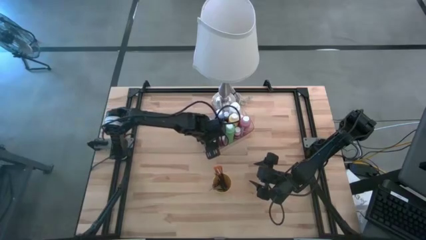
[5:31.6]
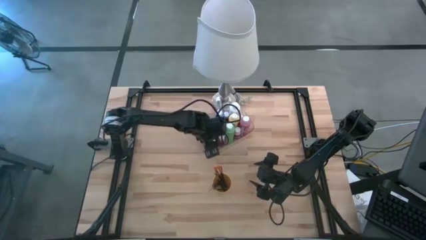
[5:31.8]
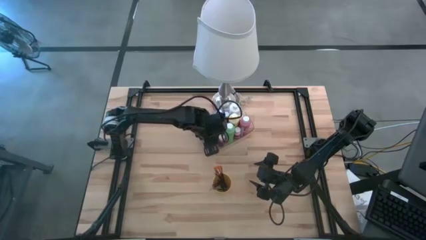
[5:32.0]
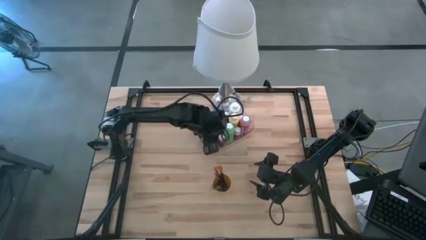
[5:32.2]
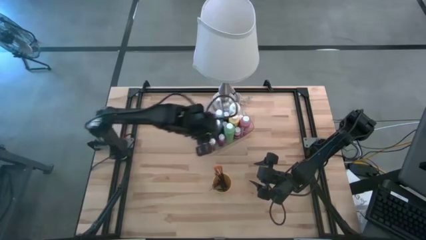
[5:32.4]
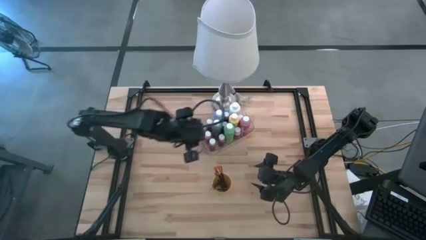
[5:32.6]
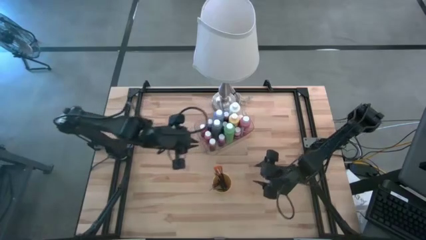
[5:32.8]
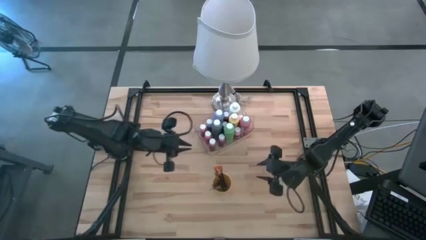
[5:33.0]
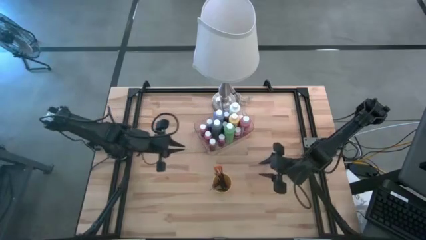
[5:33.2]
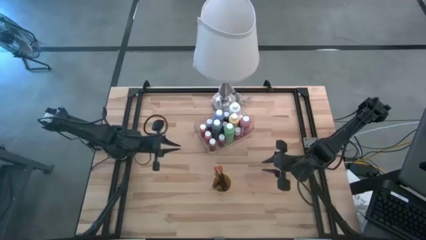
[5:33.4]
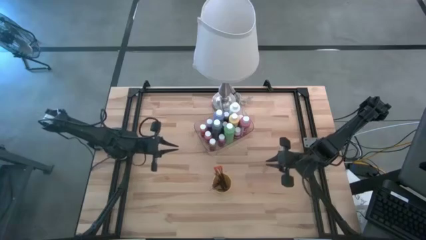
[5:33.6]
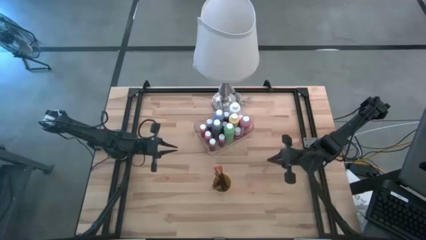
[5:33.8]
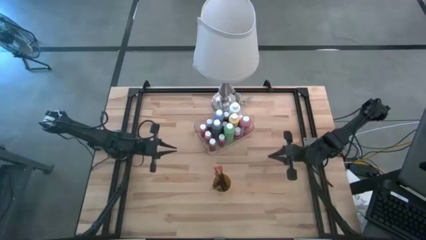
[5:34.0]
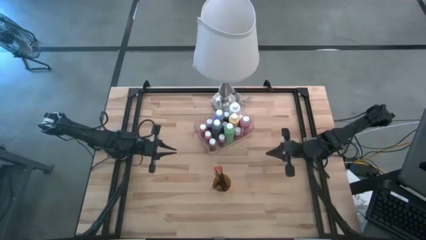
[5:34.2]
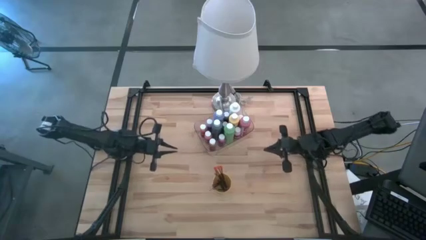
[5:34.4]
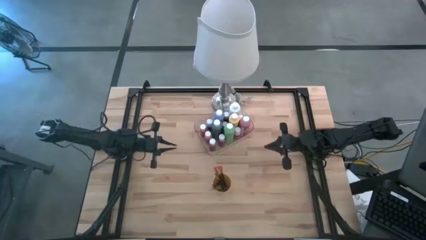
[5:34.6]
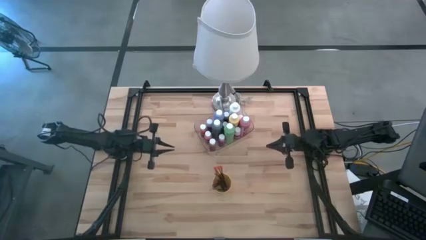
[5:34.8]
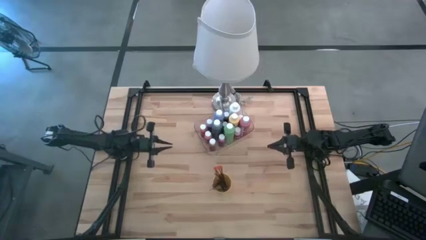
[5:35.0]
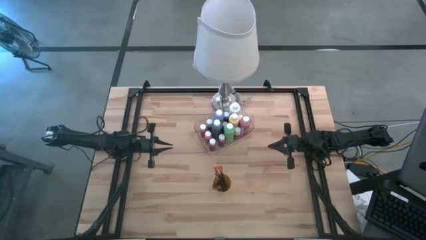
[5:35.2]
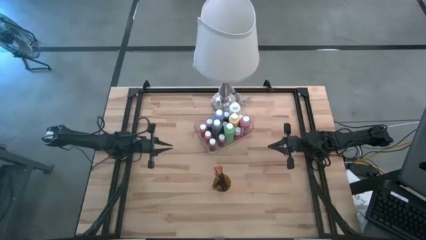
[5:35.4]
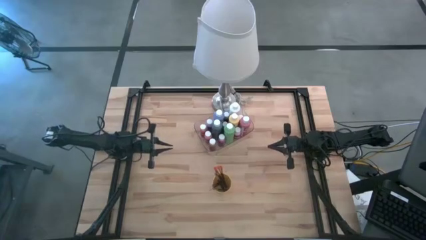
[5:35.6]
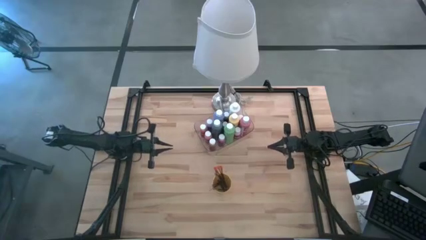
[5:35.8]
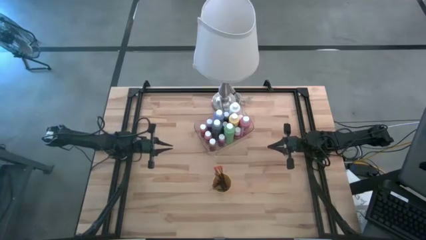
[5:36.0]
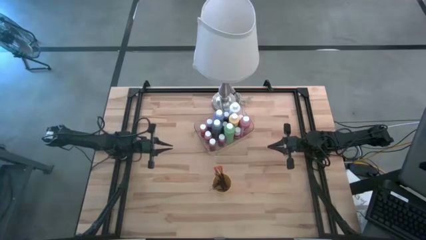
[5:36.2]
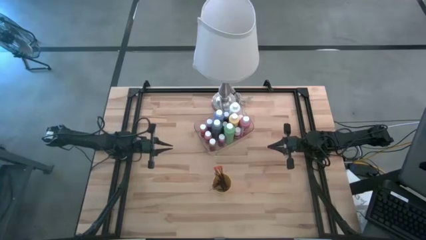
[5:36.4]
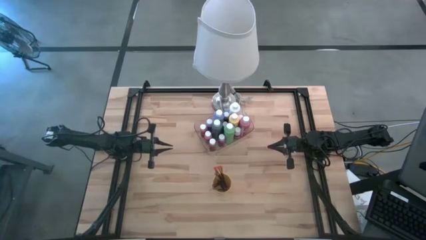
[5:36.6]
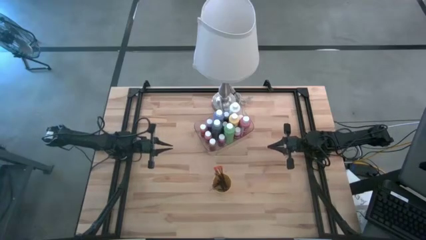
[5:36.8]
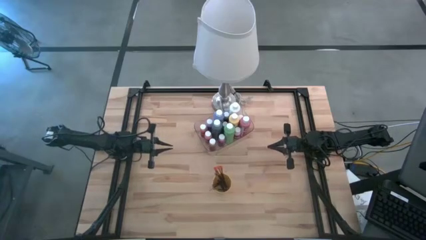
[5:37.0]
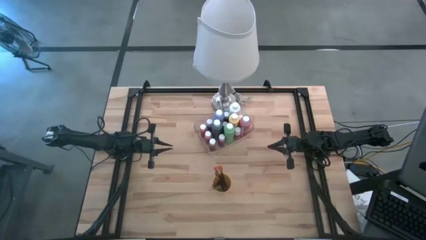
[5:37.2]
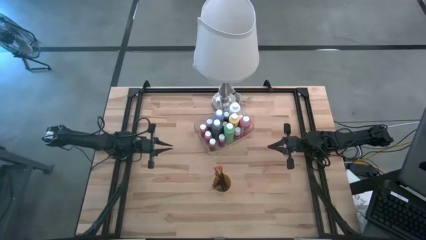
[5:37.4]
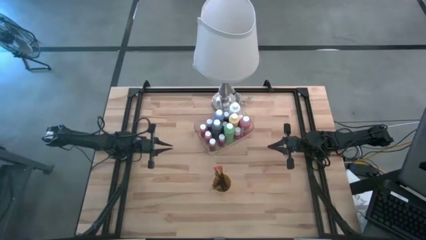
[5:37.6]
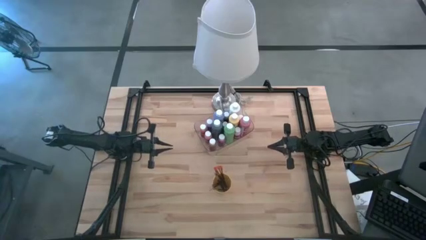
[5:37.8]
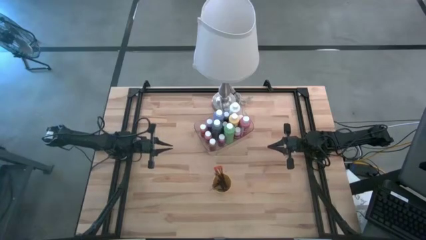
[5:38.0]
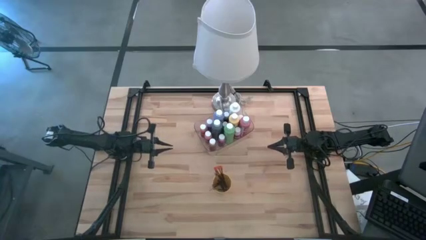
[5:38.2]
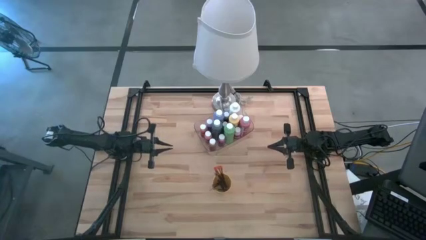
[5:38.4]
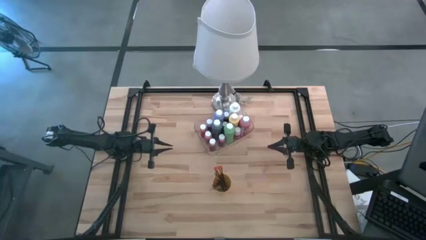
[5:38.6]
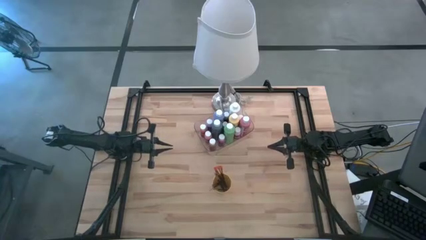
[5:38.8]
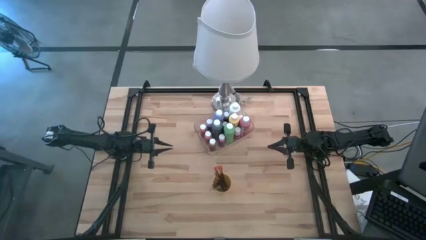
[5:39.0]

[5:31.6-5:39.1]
Task: Pick & Place Paint Supplies
Return to home position

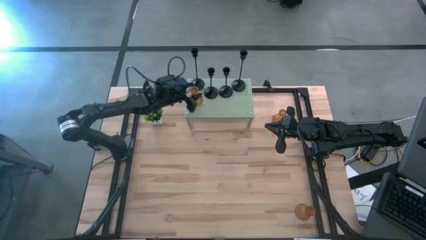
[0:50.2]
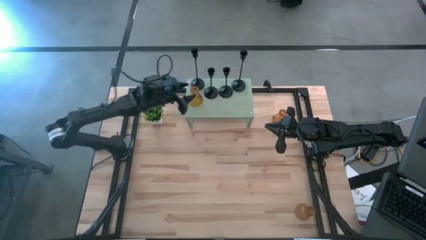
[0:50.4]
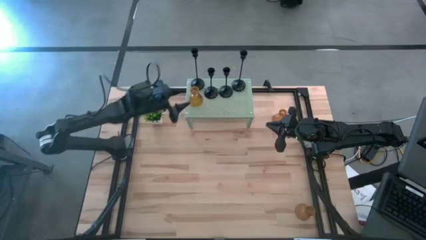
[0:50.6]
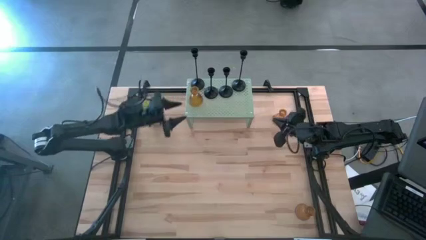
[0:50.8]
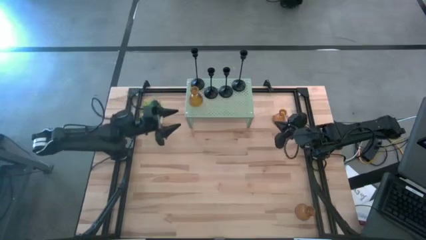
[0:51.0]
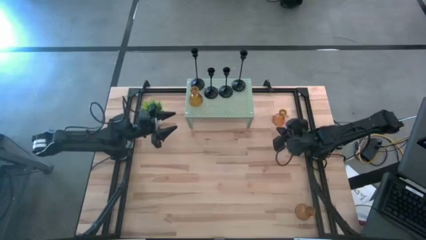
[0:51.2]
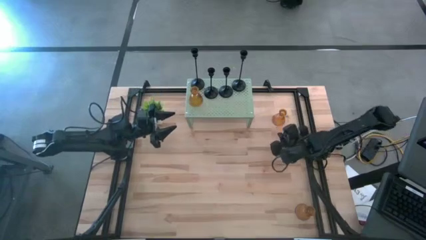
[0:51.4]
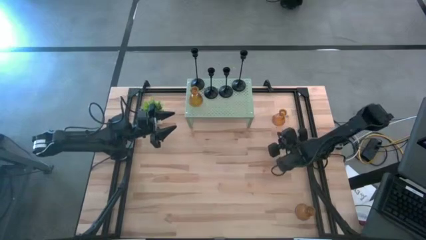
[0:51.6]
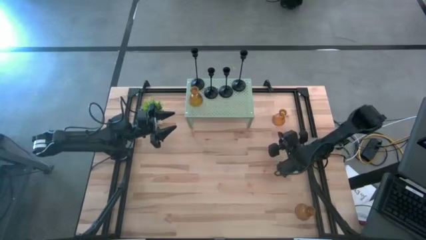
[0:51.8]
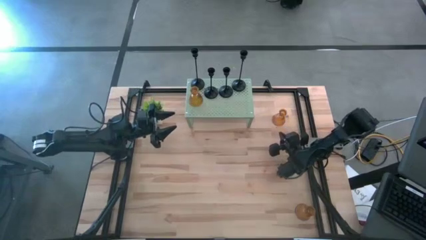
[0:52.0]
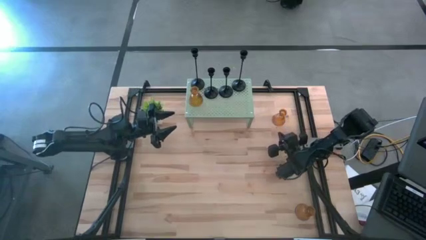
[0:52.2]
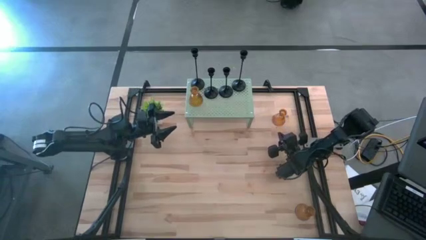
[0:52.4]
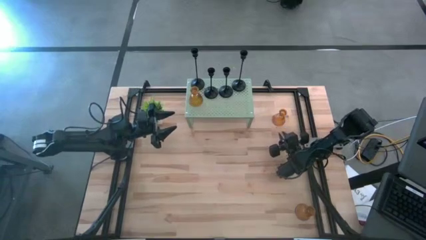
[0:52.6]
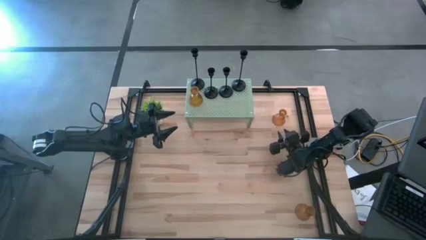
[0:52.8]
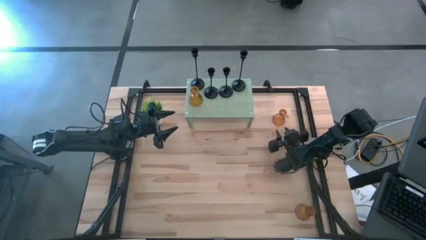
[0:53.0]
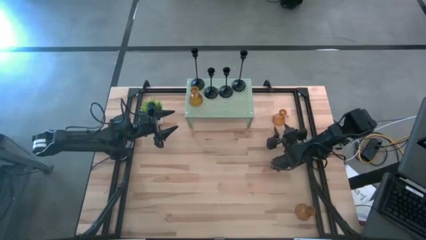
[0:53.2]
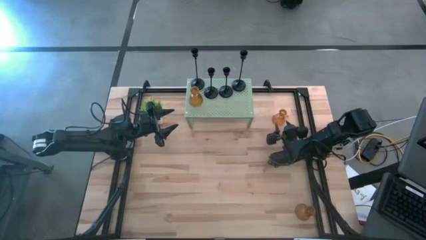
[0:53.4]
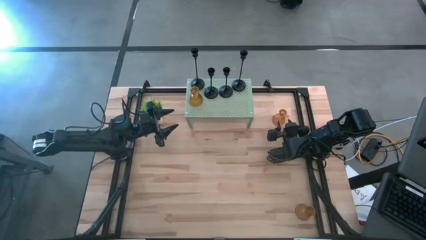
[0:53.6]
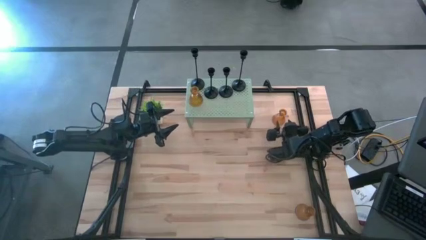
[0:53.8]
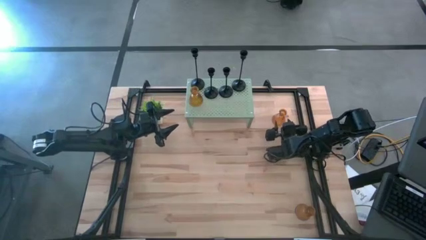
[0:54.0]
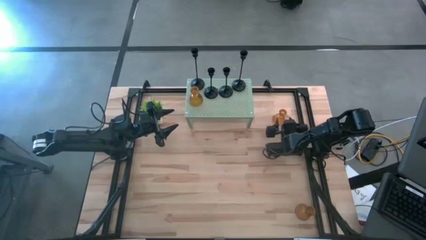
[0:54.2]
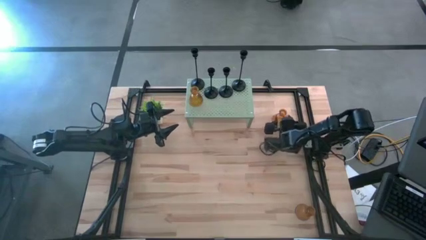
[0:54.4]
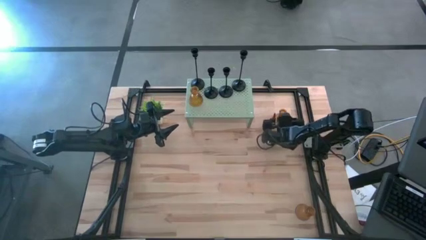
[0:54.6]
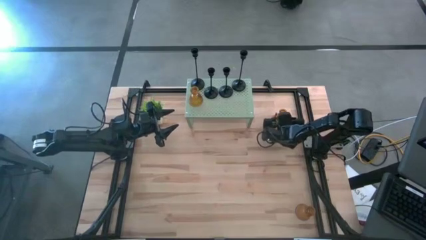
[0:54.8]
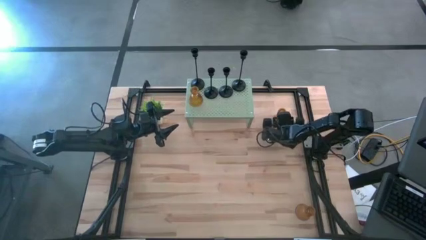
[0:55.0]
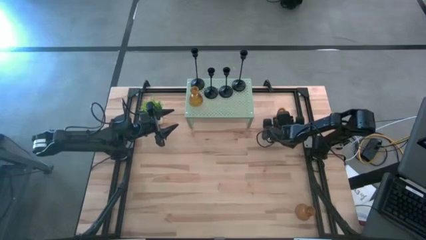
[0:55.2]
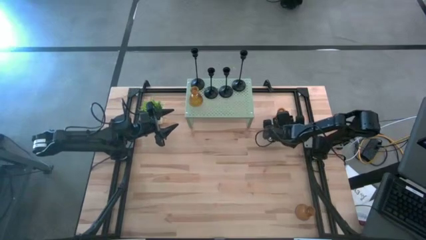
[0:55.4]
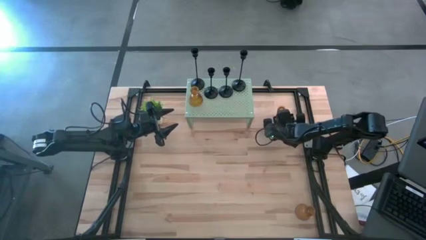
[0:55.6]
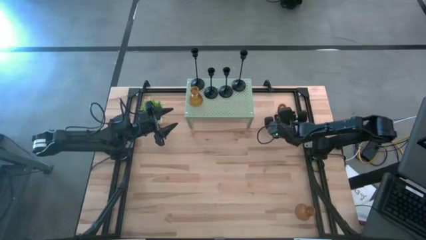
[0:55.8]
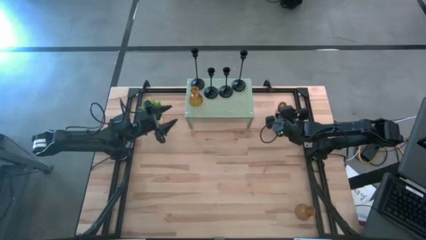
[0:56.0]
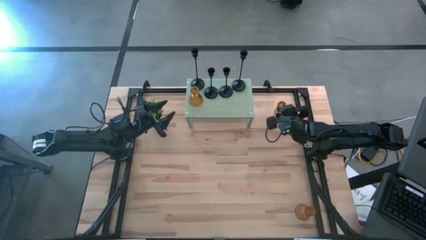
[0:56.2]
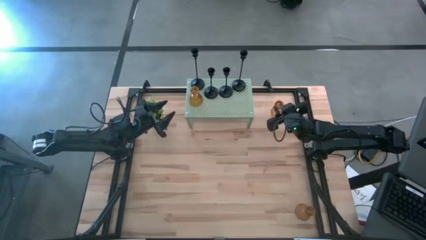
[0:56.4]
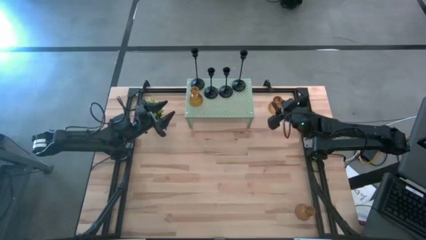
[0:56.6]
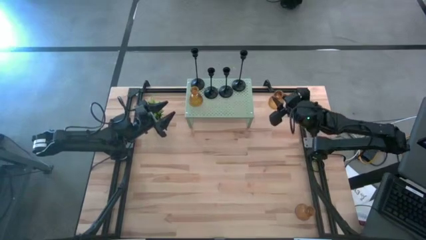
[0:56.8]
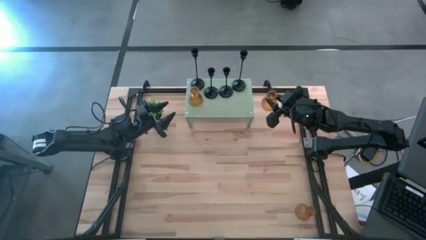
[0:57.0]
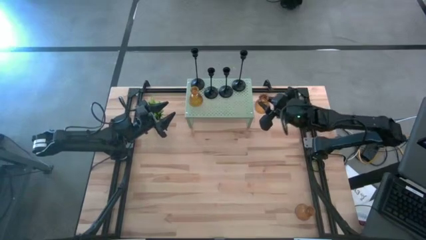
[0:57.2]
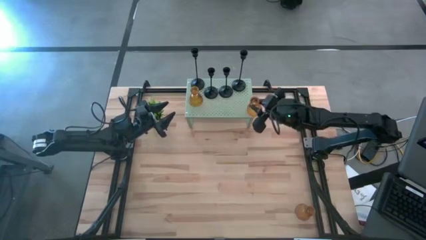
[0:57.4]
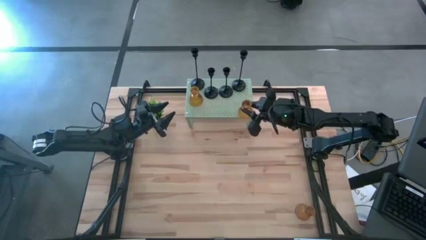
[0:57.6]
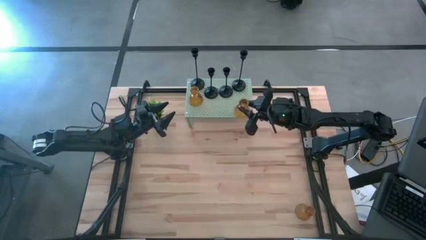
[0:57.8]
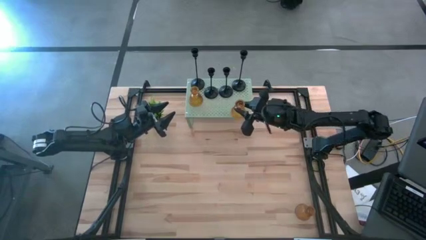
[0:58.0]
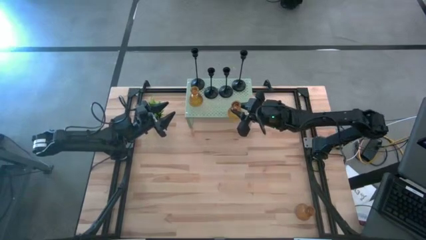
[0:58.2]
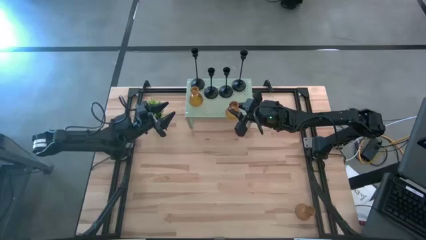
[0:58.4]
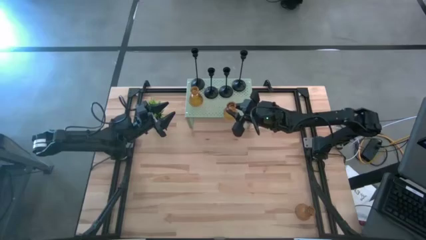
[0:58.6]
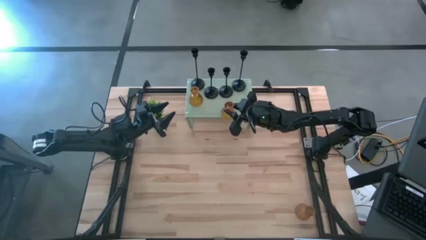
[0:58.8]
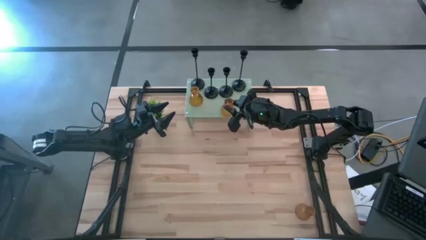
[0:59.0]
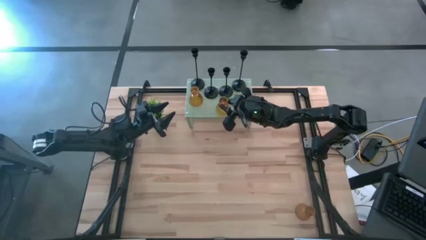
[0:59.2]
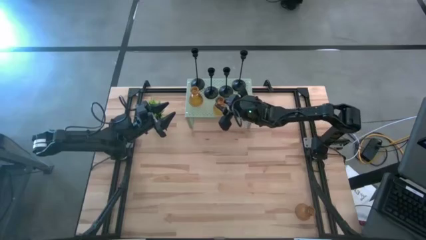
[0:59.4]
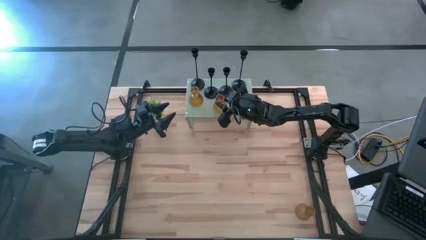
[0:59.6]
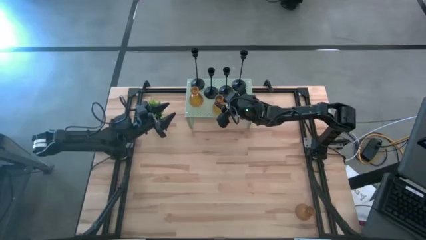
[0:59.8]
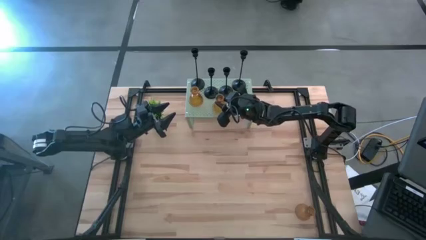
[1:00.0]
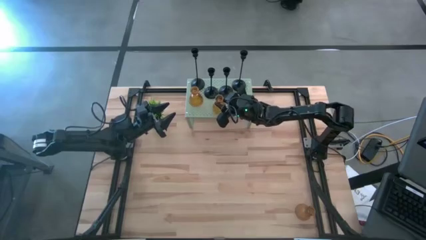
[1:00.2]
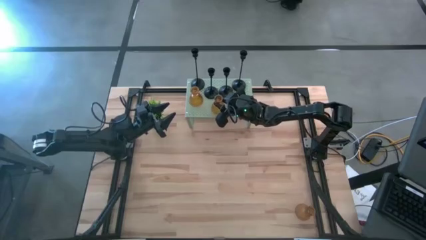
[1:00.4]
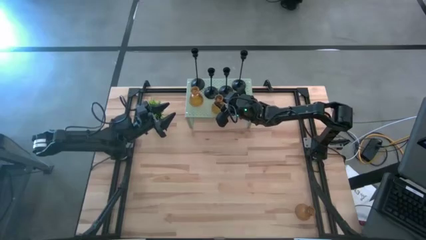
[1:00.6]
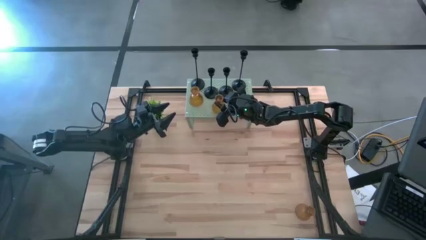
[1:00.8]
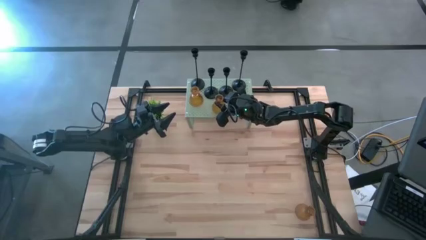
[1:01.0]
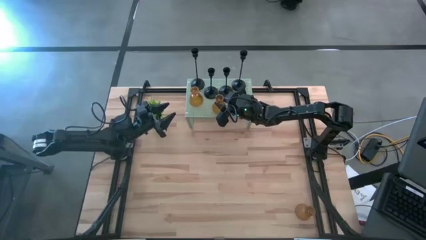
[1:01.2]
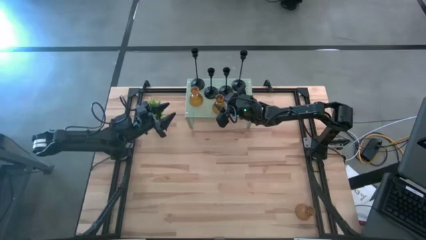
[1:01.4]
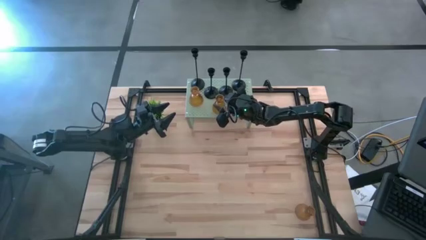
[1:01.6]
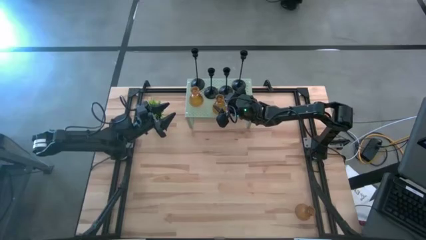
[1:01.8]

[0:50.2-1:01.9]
Task: Pick & Place candle stick holders
Put the top orange glass candle holder on the shelf aligned with the other orange glass candle holder
